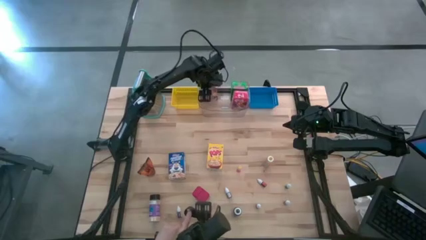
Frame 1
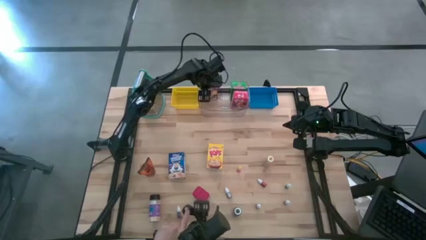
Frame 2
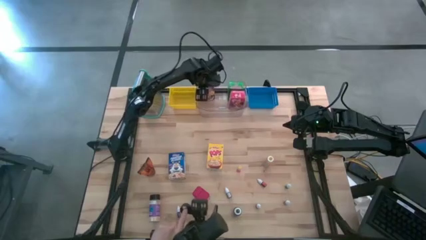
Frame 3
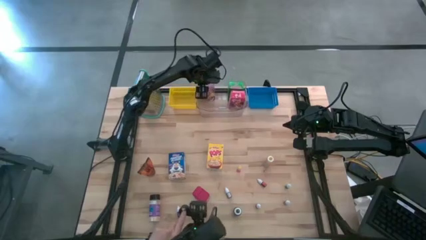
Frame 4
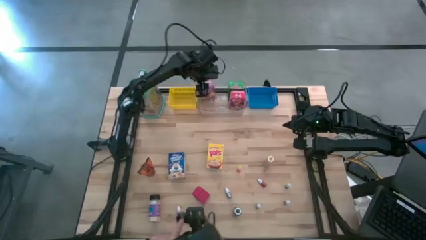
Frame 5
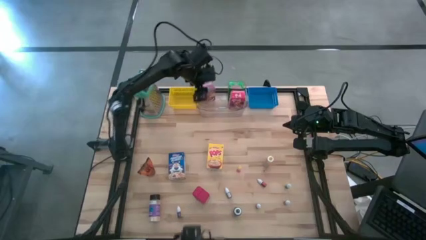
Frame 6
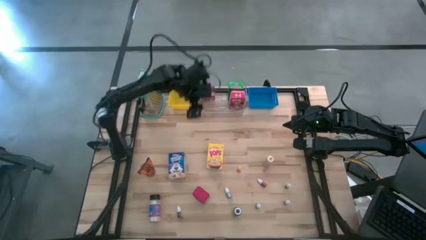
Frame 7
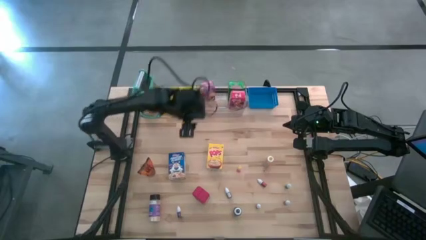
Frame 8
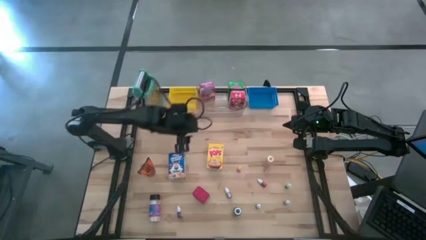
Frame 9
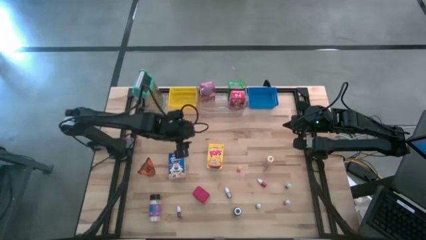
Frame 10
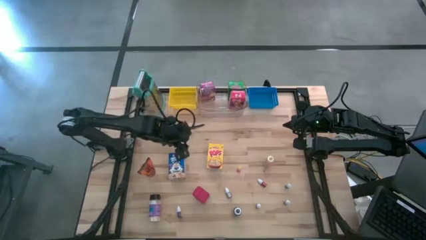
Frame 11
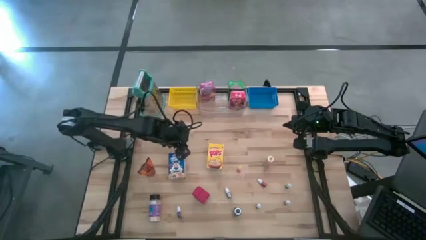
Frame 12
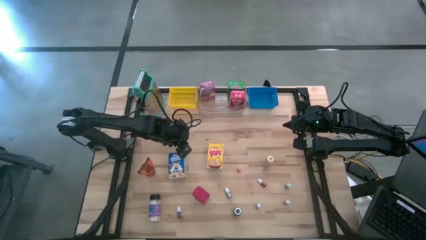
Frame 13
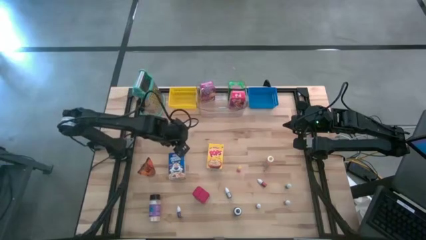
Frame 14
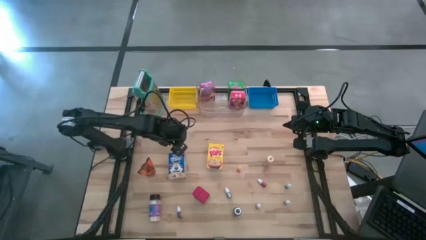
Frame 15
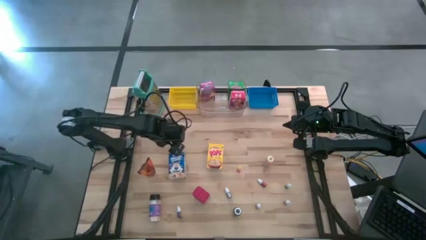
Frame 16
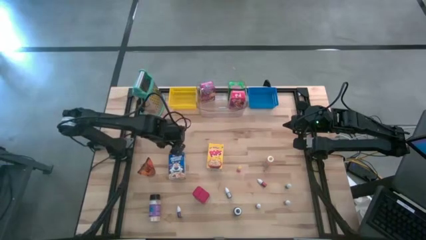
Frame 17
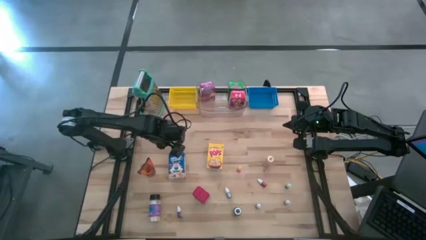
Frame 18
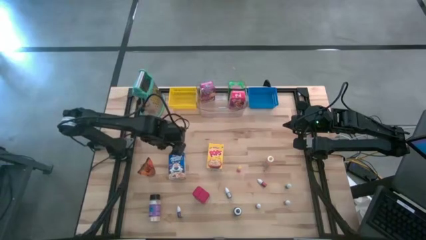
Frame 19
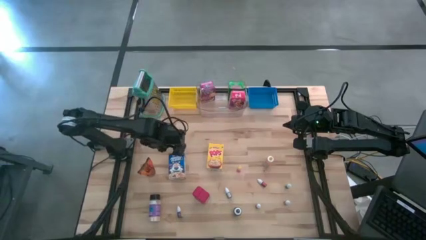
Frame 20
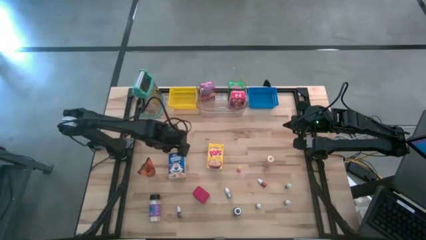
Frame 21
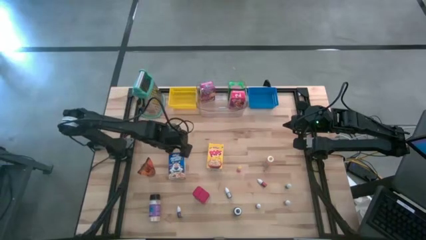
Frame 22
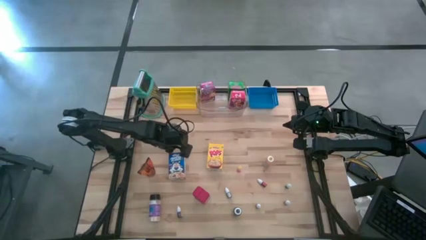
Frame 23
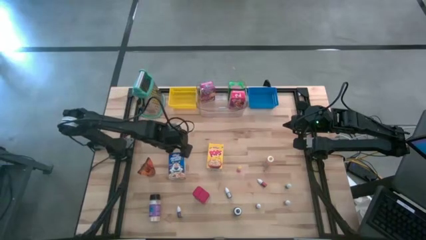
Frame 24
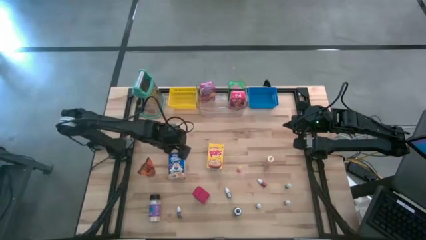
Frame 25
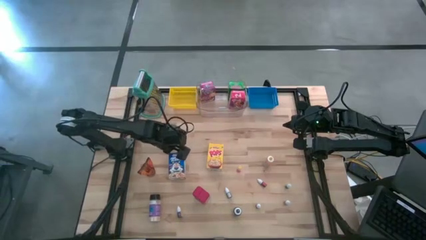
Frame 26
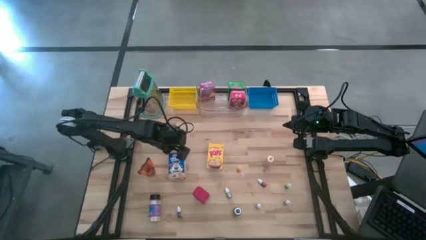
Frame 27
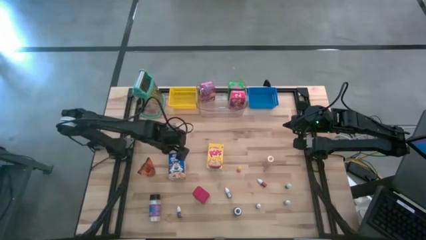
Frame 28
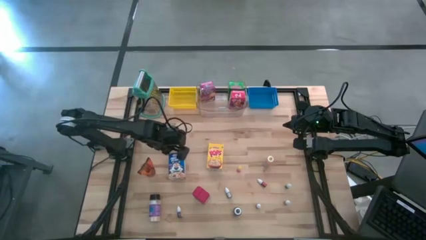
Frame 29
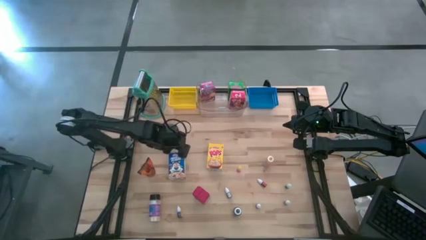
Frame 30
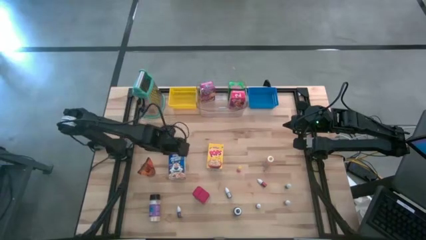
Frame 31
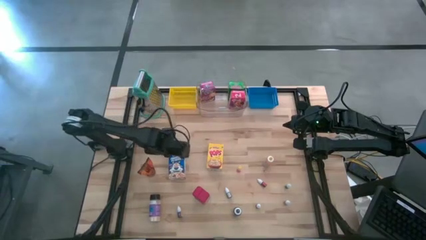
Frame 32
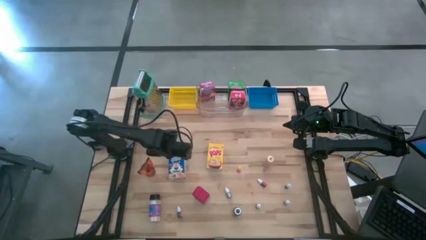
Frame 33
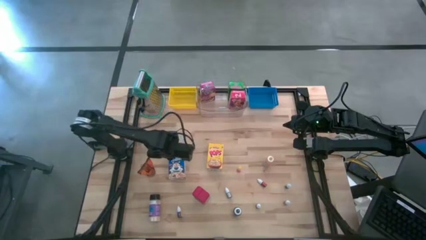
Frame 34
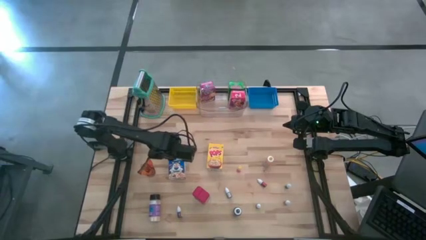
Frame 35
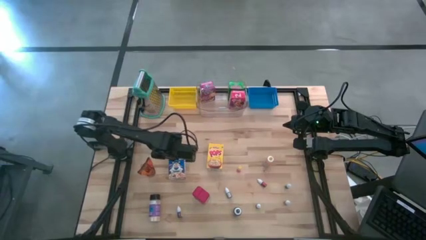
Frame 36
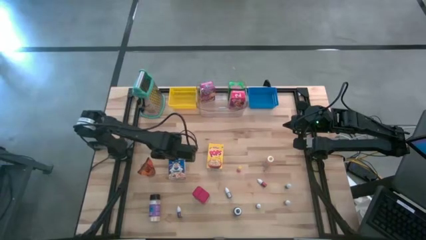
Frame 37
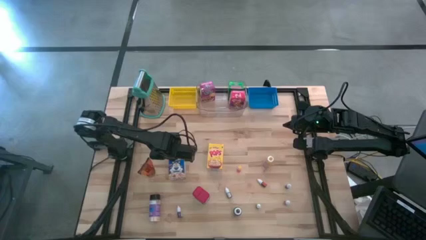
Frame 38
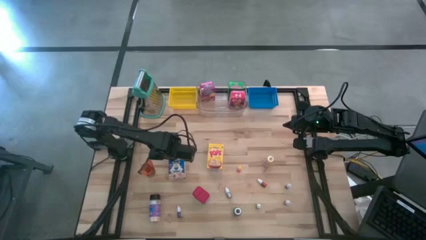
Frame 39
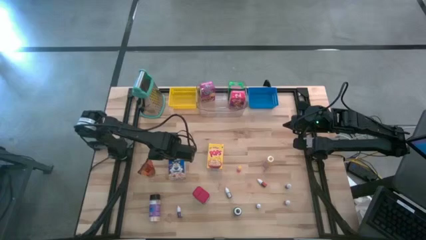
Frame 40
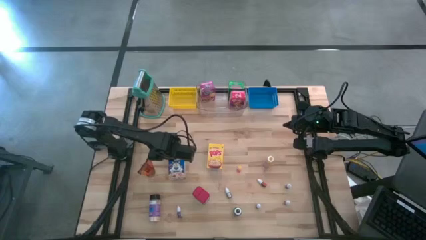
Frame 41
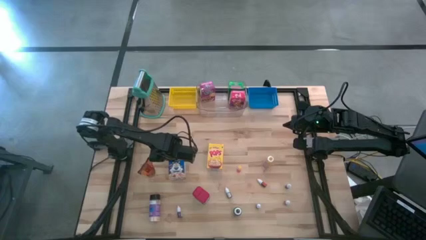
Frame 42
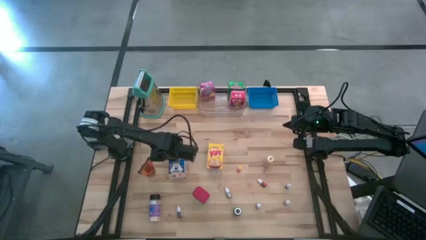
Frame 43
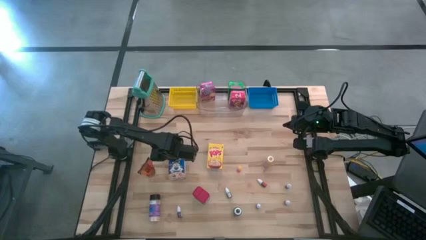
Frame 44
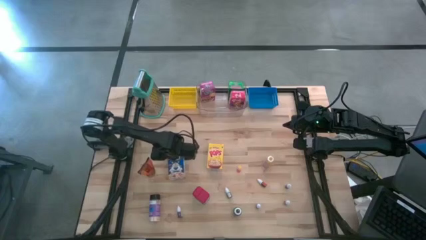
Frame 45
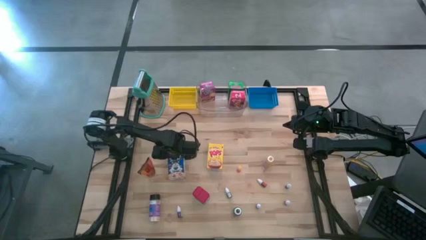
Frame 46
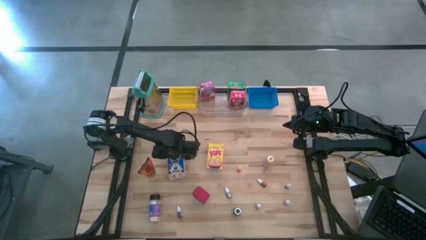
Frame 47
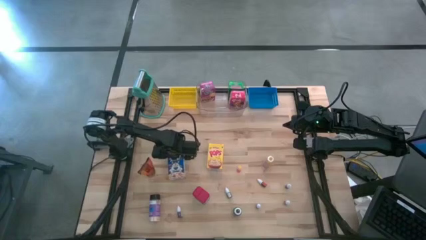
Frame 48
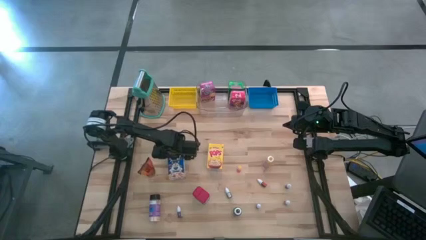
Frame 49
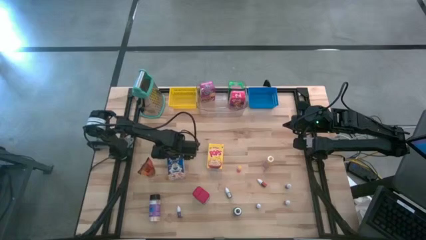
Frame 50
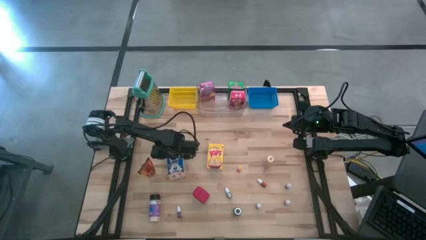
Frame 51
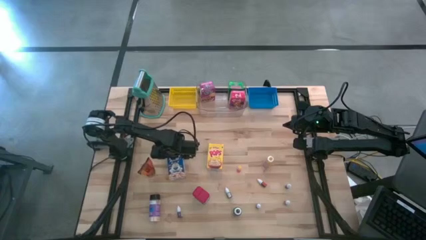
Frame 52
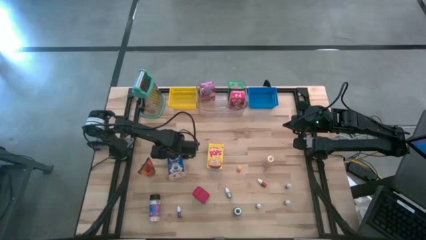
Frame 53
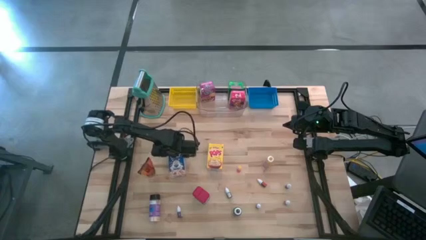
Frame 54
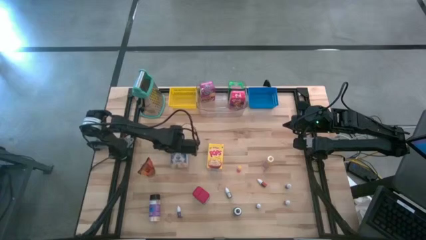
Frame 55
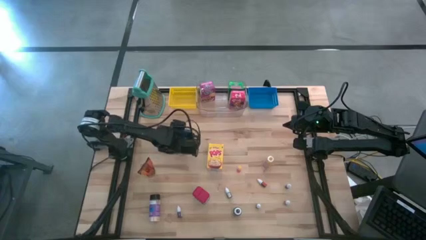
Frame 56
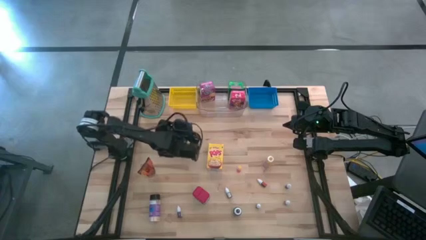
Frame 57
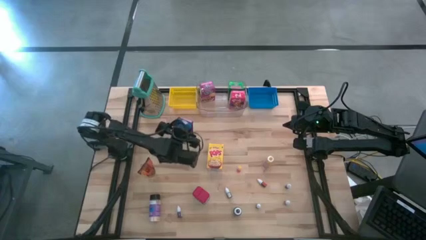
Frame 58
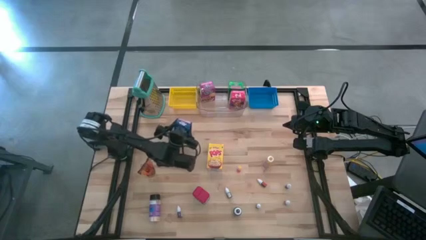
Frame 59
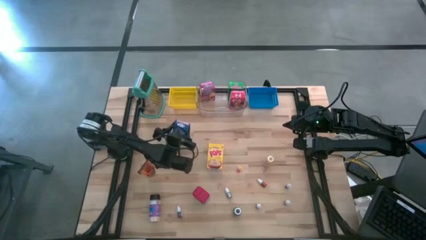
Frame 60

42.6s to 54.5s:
Task: Pick & Place Kitchen Items
Put the blue cereal box into the transparent bin
